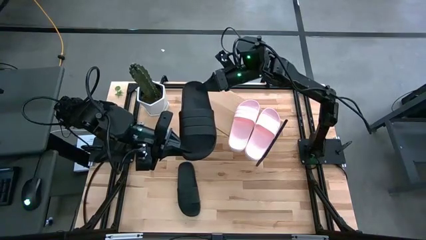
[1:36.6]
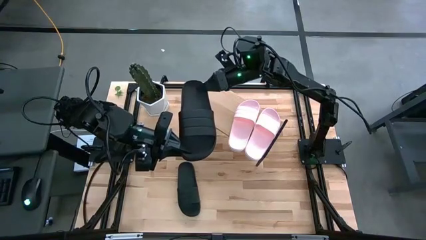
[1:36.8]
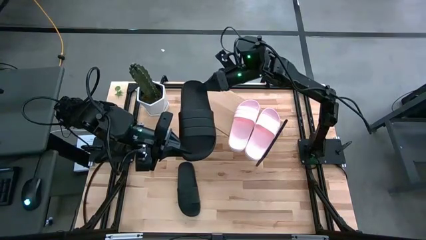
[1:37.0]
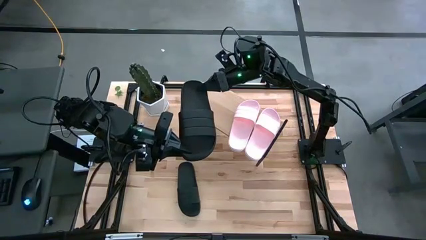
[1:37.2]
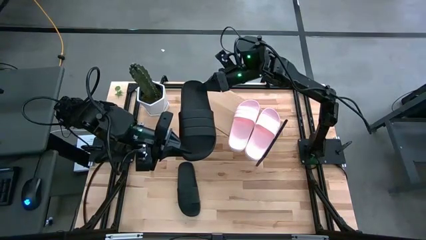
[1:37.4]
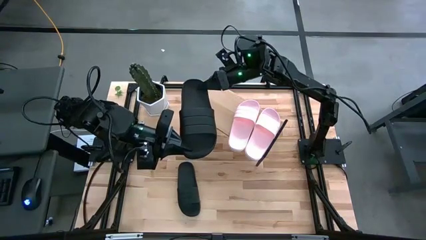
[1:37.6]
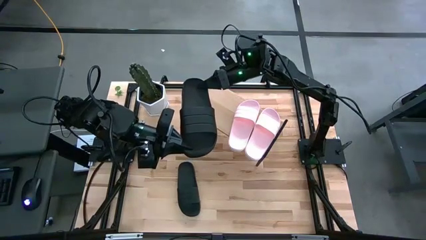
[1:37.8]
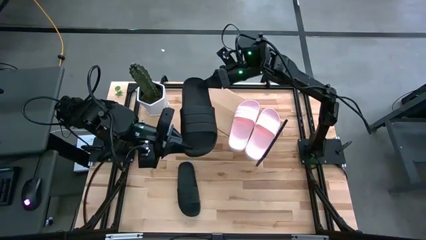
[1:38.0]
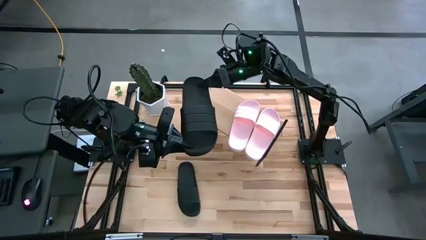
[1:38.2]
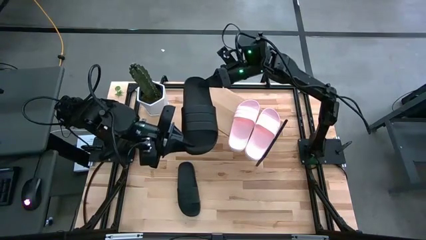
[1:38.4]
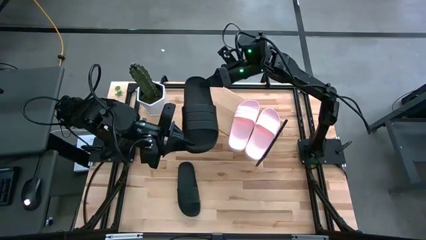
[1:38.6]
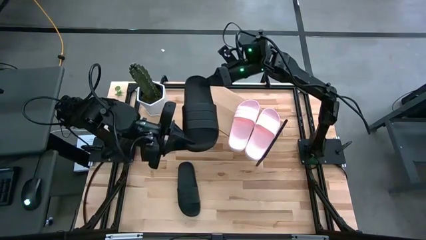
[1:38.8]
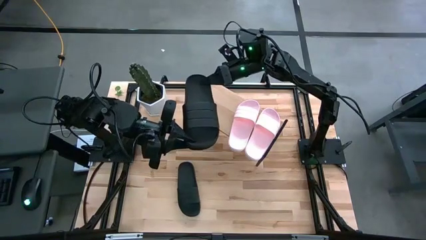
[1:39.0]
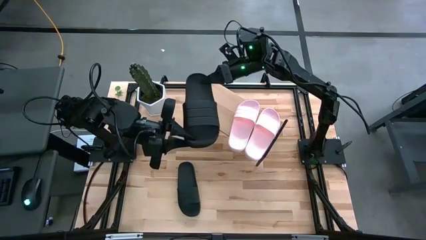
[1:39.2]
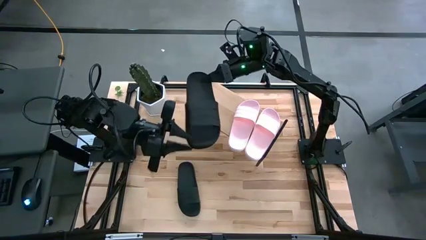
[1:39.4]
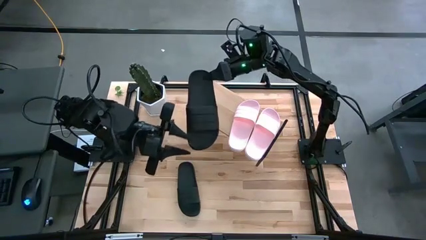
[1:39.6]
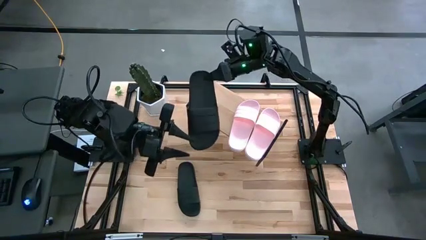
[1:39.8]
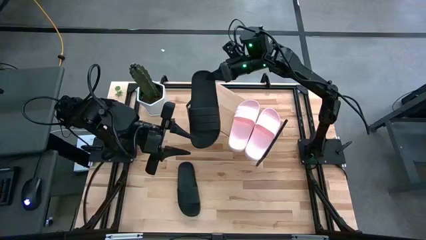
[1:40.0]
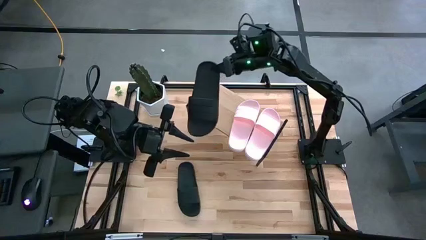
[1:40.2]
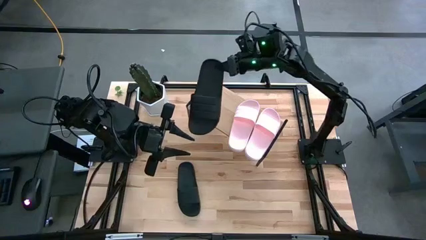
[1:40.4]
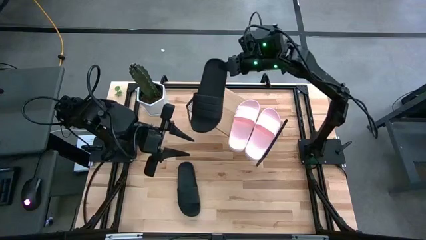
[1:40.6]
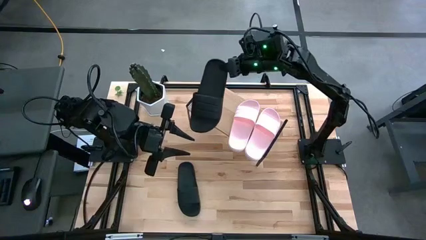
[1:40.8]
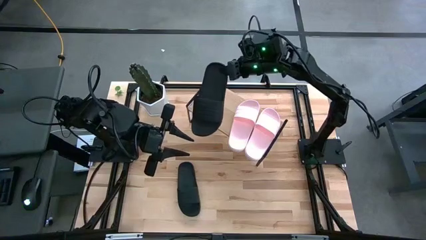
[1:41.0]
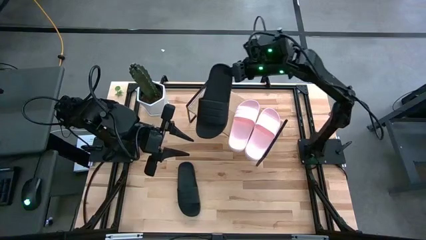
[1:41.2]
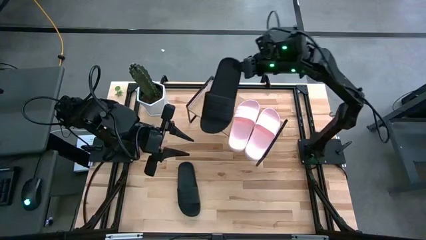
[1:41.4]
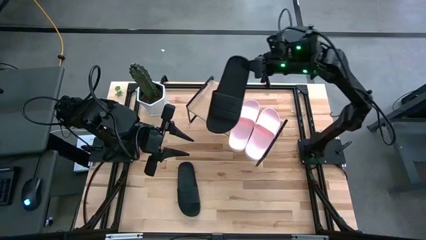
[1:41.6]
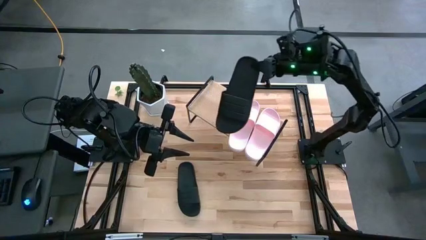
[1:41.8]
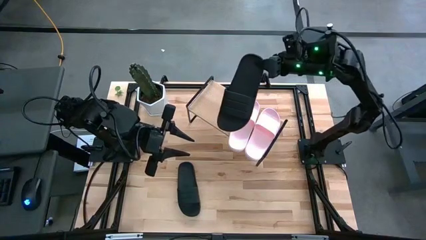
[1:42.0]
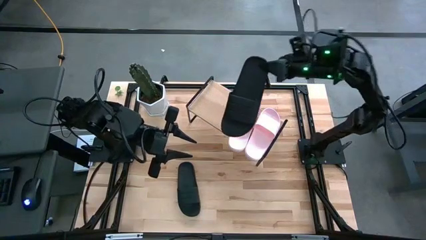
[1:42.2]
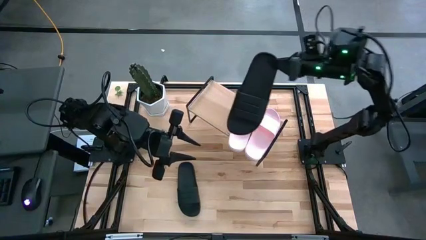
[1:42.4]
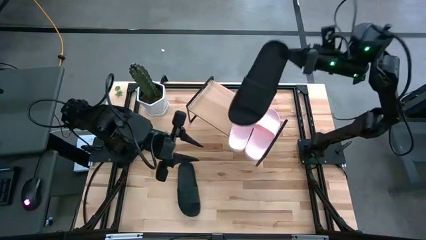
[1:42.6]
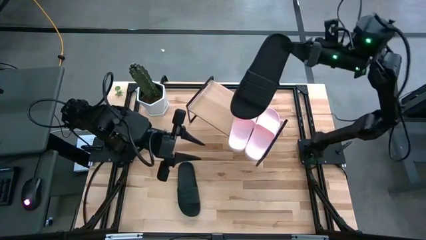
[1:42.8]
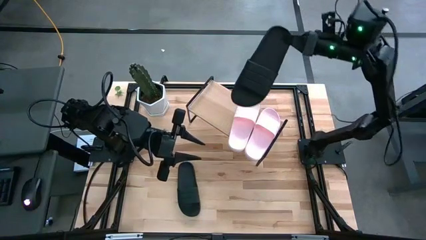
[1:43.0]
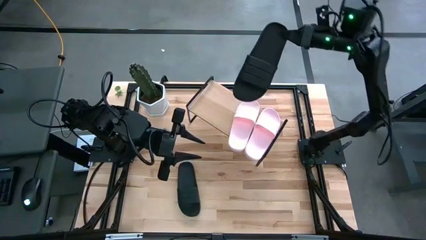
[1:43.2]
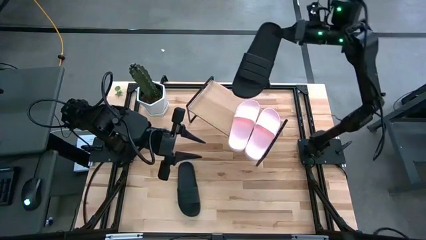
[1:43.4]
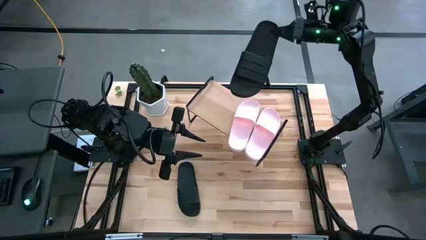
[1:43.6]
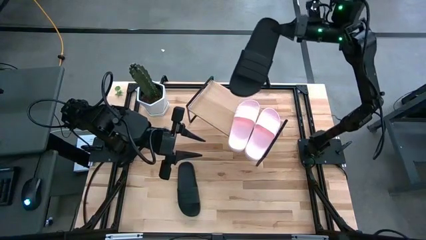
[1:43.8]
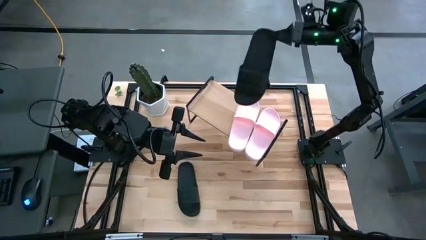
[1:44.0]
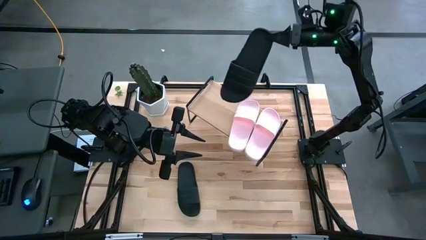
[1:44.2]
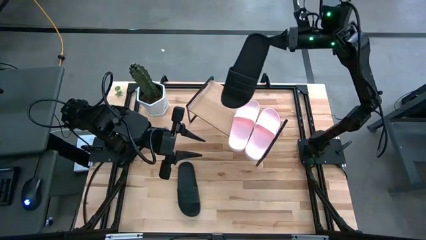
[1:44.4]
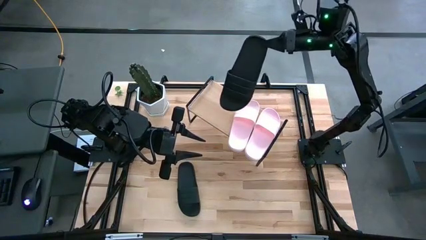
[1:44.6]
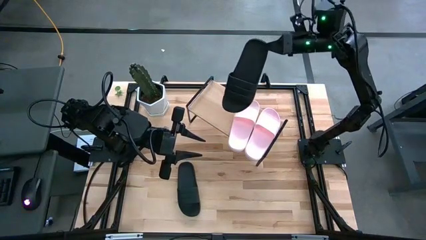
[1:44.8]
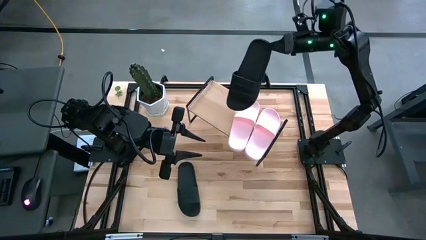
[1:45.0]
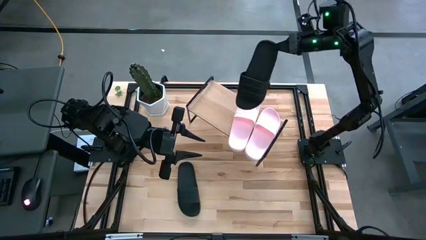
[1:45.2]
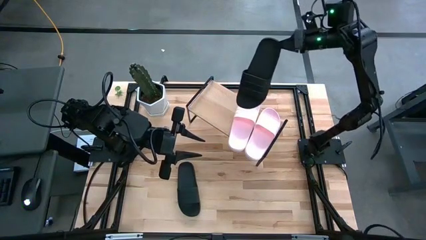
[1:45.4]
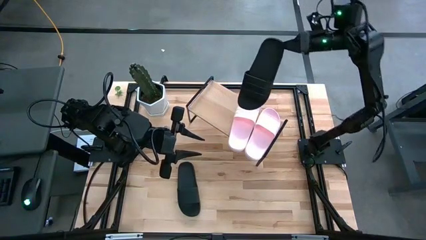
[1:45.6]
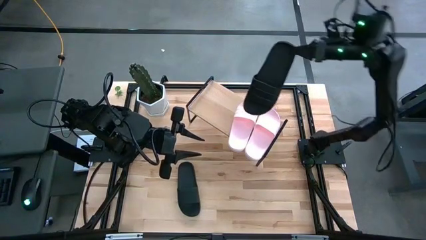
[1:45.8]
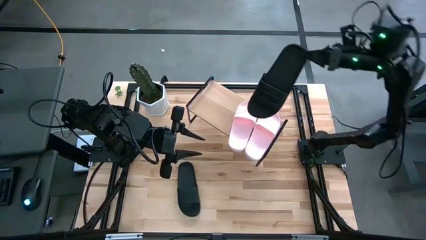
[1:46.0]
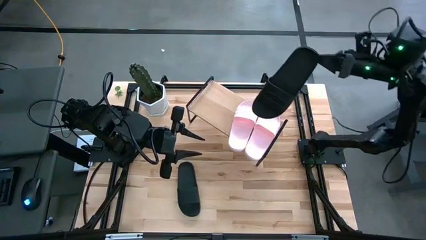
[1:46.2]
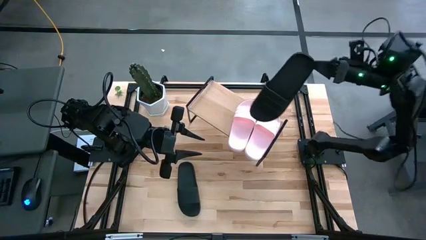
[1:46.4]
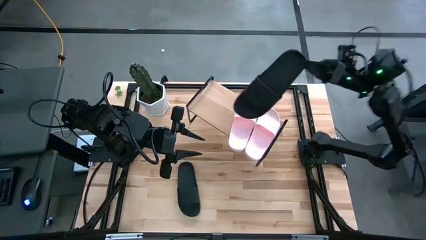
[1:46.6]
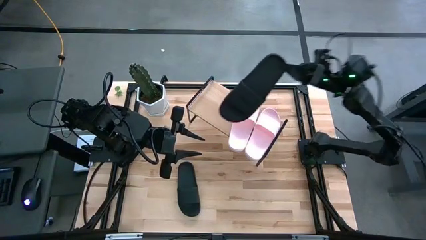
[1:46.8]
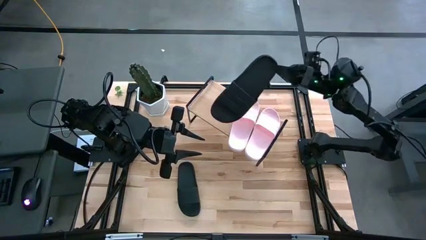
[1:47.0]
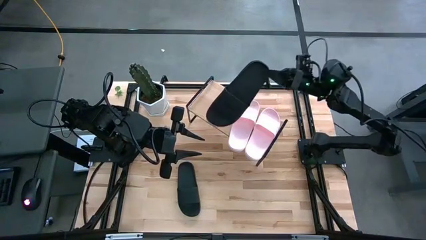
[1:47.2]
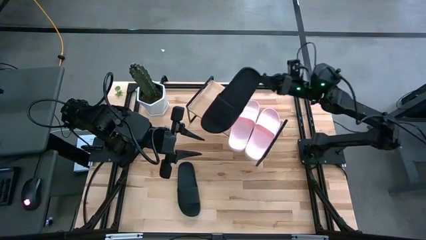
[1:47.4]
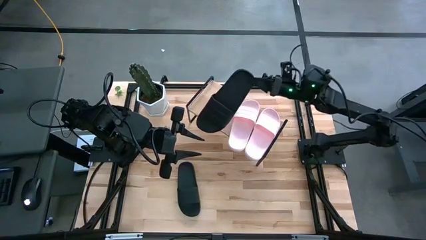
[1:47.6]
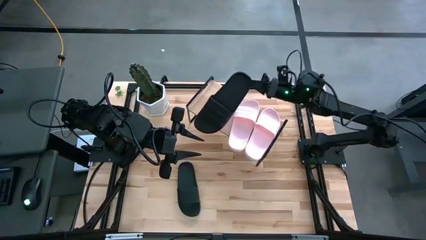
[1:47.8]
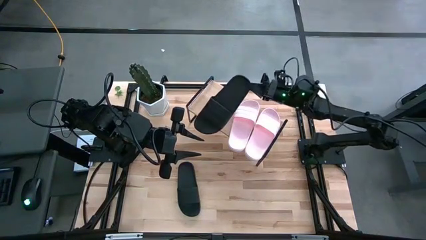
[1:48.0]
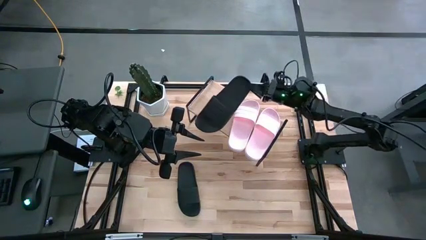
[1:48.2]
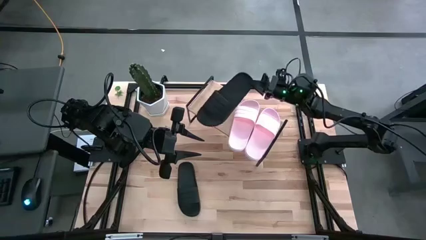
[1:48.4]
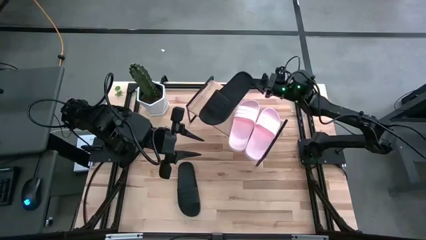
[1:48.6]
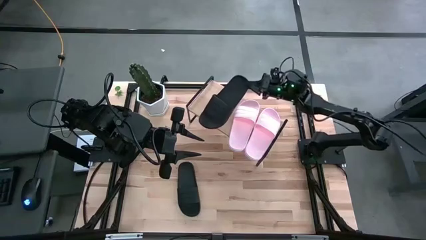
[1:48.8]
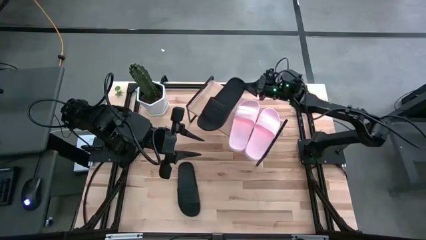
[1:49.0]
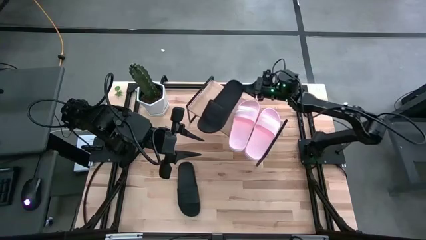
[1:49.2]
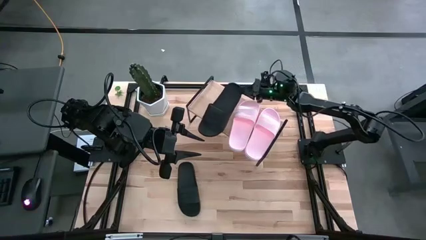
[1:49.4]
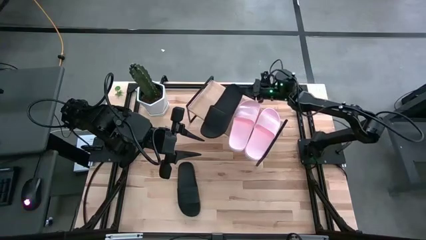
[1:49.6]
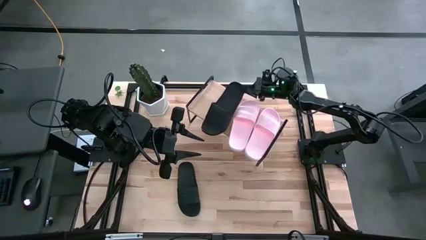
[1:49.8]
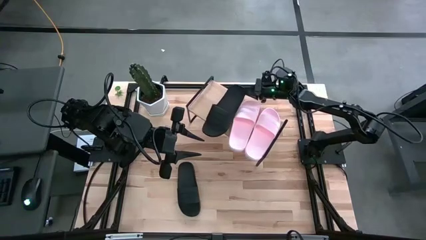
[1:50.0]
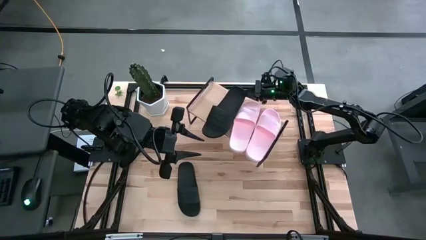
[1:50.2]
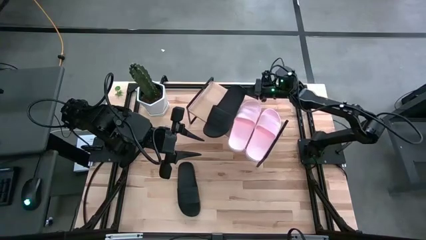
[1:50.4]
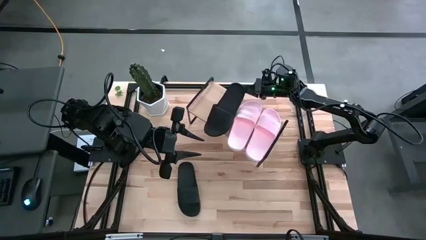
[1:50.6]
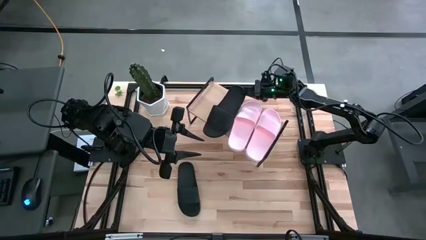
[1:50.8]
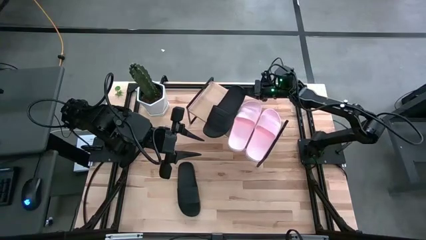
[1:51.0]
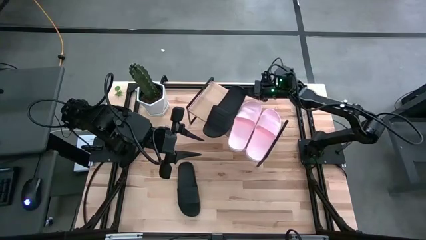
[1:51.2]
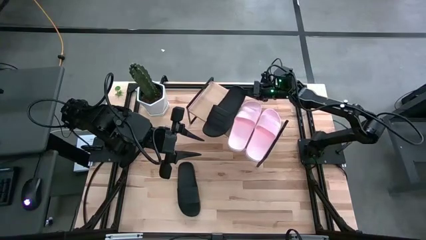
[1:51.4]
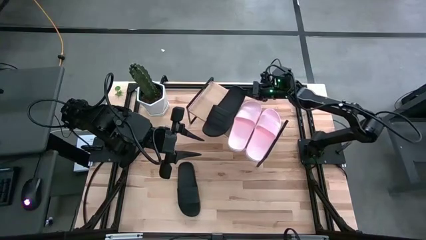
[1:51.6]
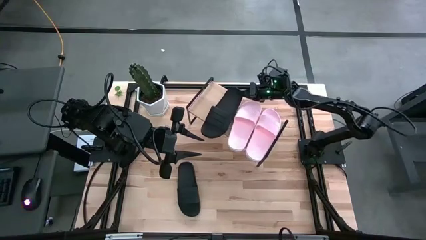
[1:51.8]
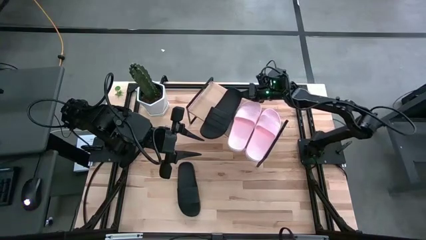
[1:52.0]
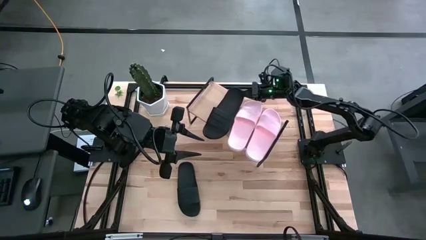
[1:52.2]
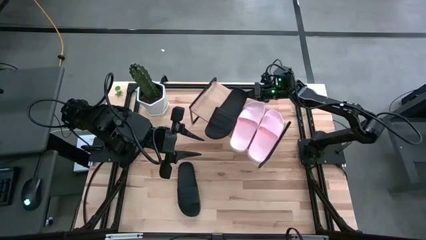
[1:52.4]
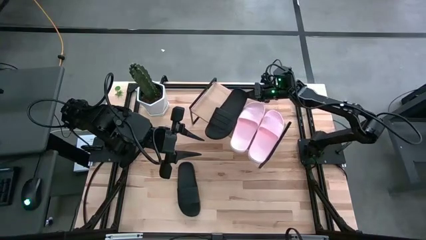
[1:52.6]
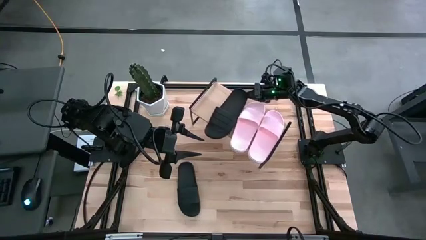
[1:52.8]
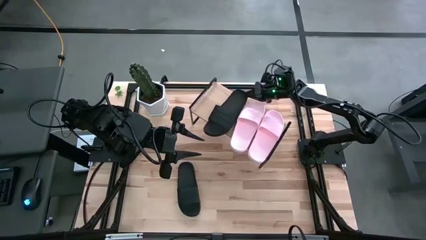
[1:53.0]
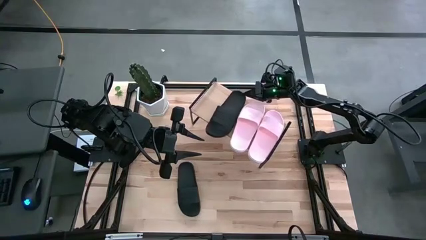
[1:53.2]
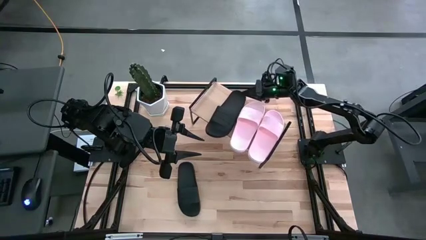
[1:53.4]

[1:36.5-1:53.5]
Task: Pick and place slides into the shelf
Put the right black slipper on the shelf
